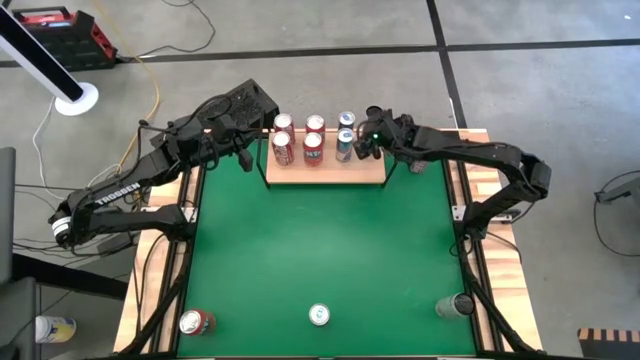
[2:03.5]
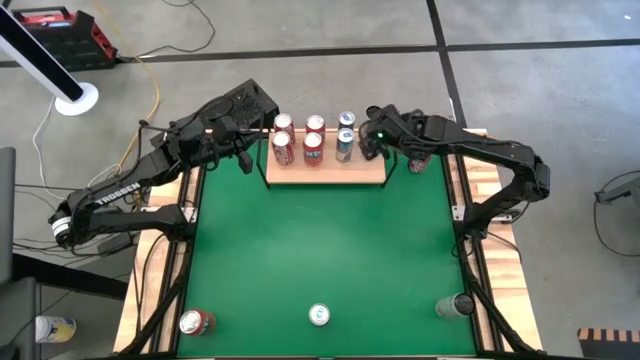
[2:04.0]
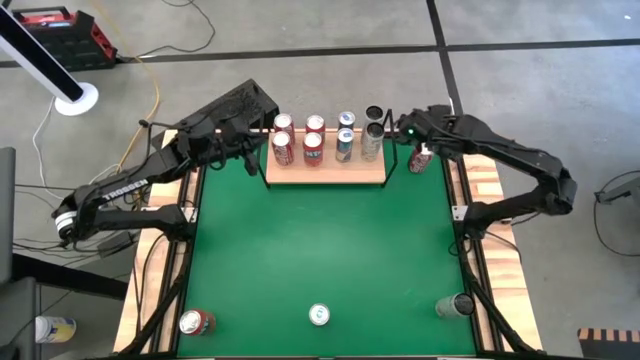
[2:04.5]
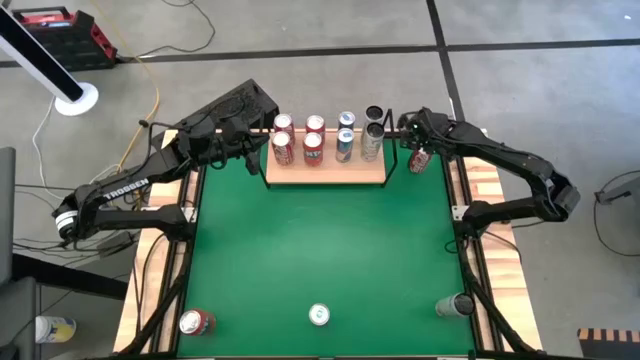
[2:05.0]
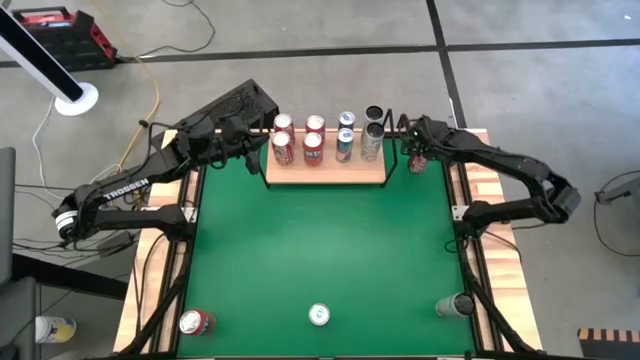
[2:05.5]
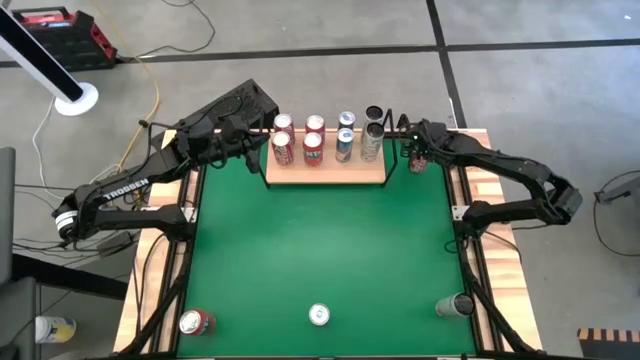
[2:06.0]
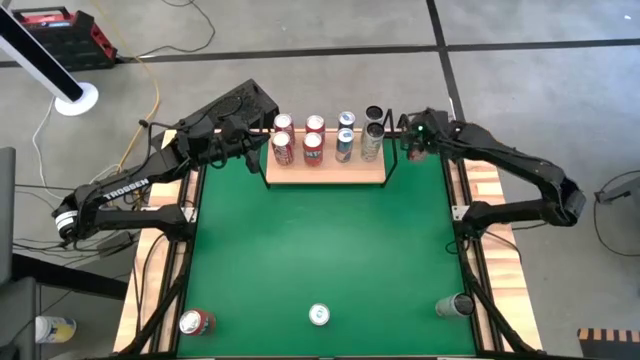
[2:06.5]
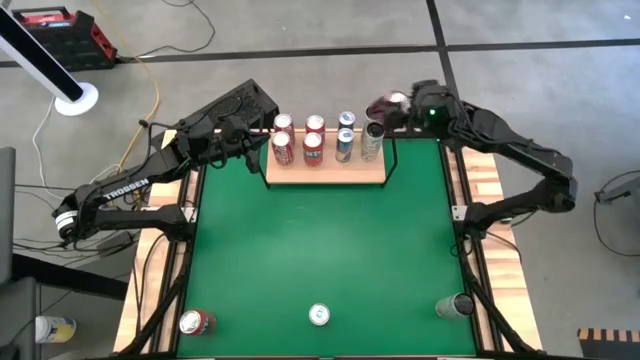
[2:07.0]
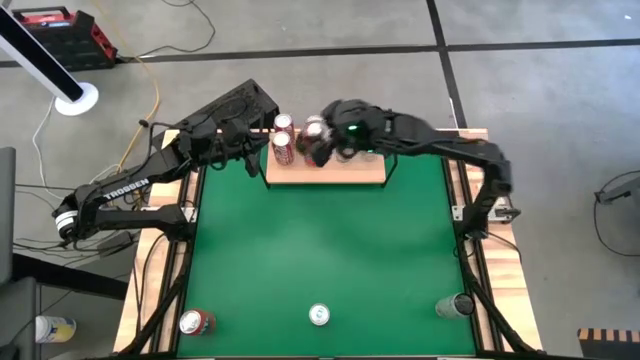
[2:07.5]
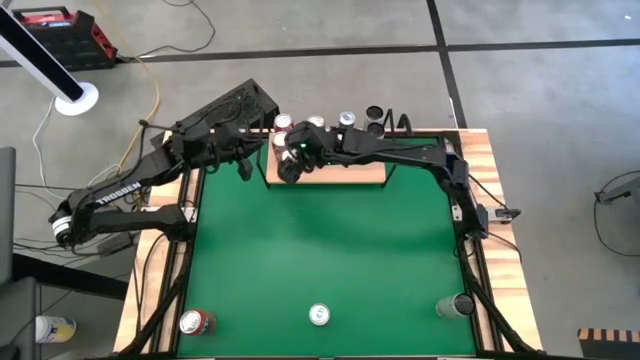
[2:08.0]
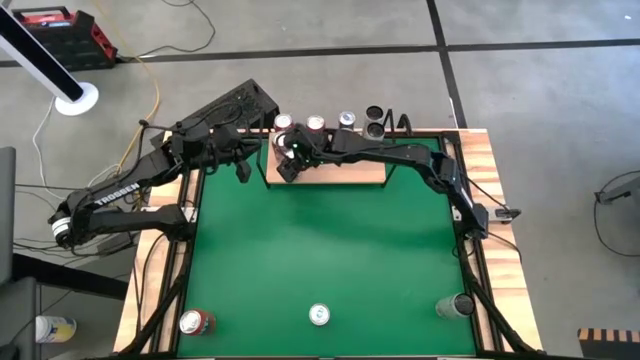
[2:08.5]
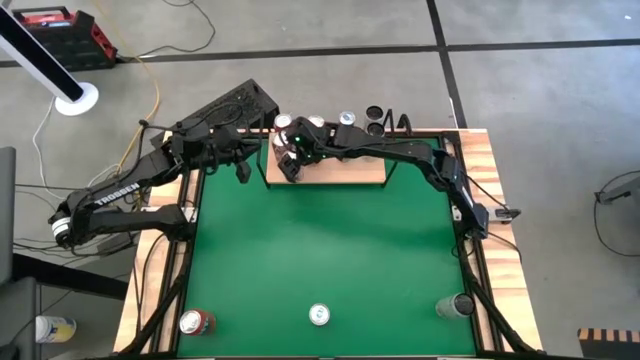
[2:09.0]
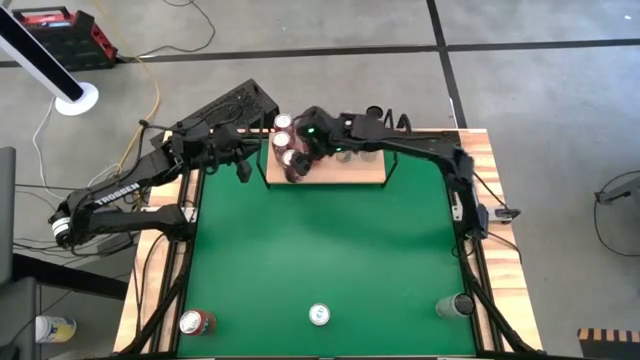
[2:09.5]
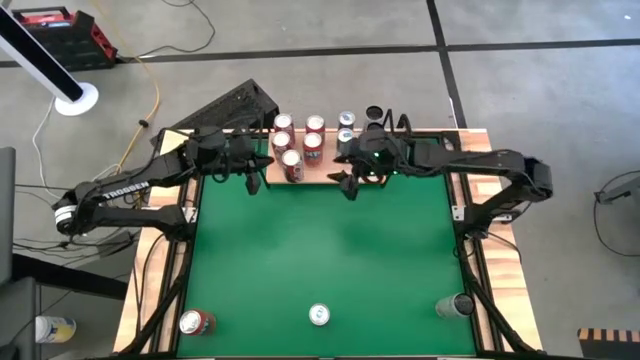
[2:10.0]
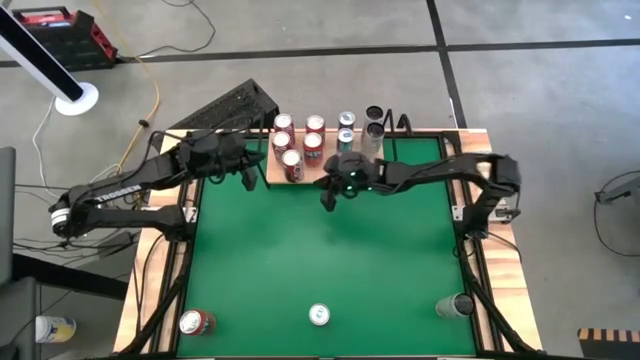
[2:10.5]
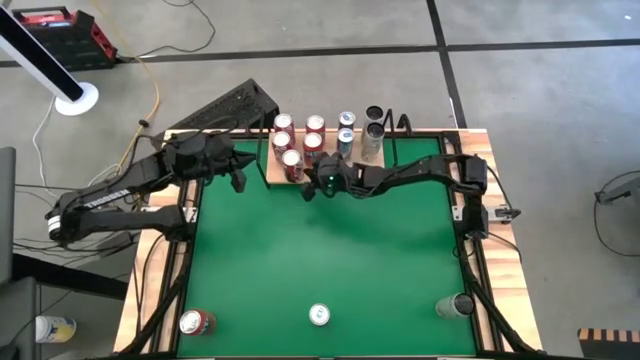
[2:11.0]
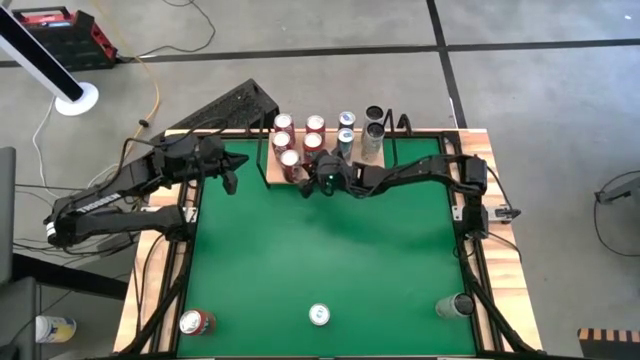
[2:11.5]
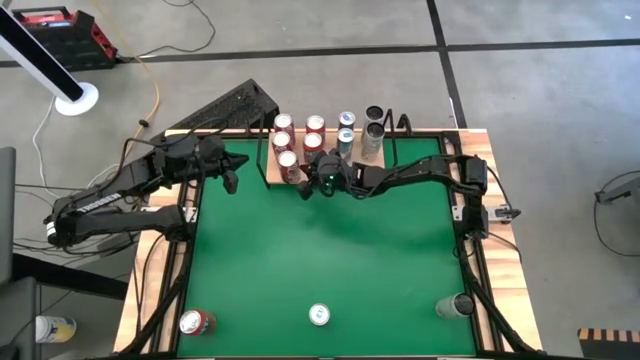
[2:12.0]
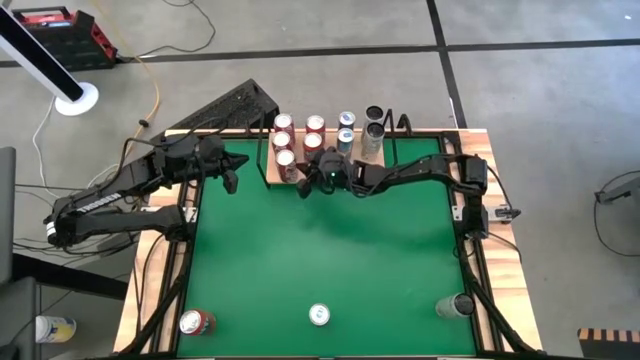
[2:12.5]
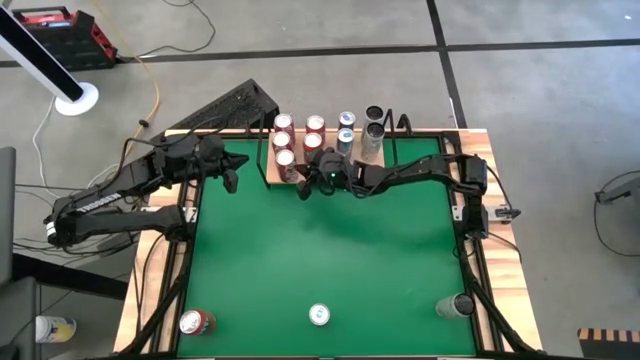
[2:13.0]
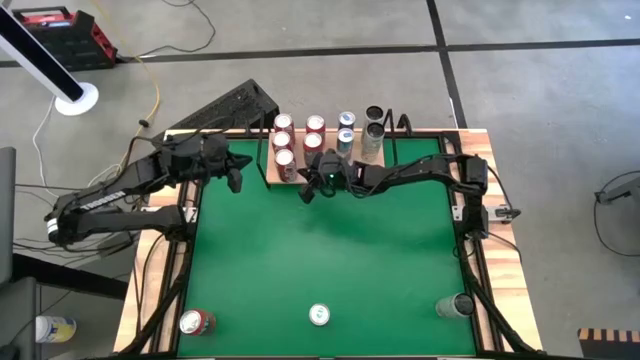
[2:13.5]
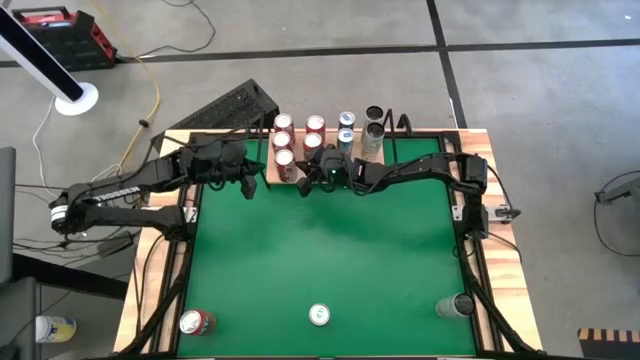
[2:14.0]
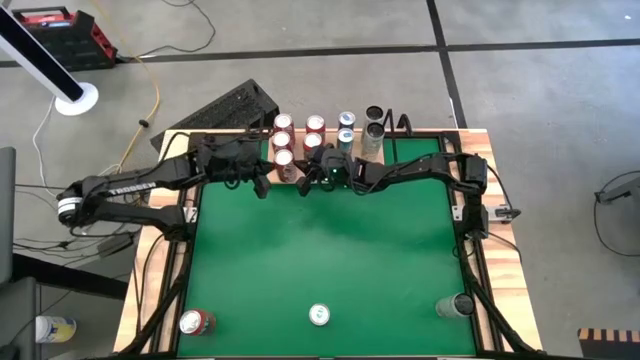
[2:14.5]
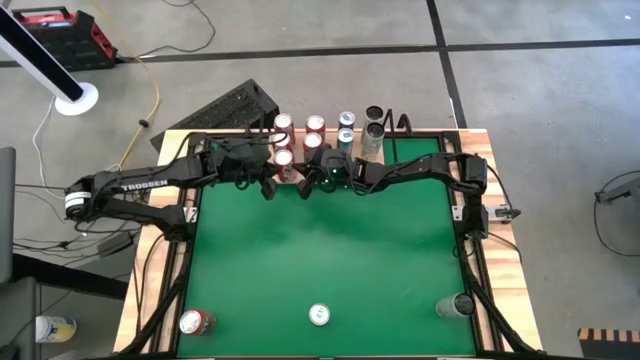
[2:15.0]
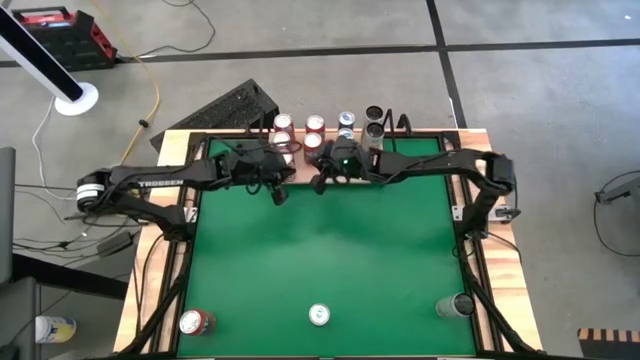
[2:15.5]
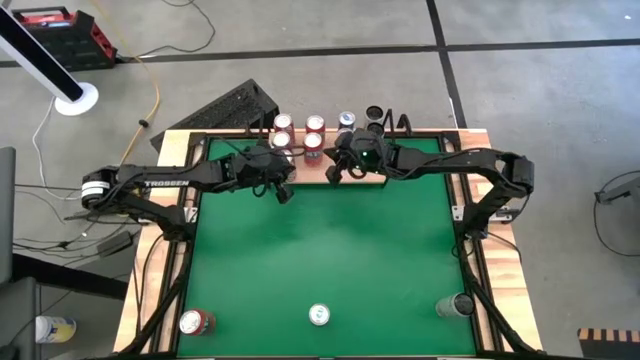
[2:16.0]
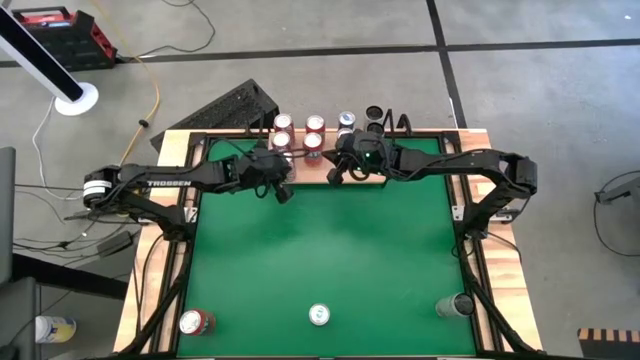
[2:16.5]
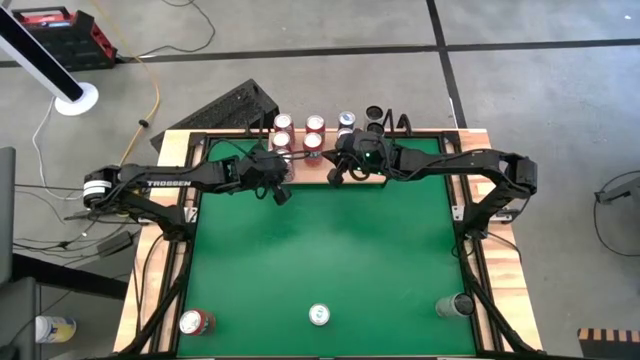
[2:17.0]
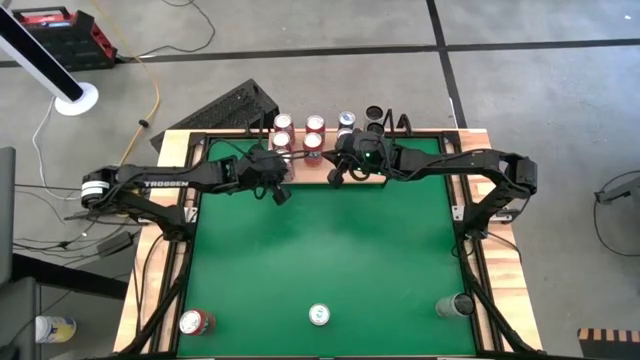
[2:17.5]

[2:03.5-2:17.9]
Task: Place canned beverage on shelf
Put the red soda can on the shelf

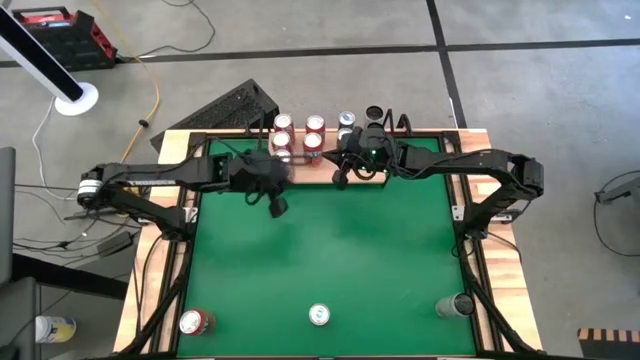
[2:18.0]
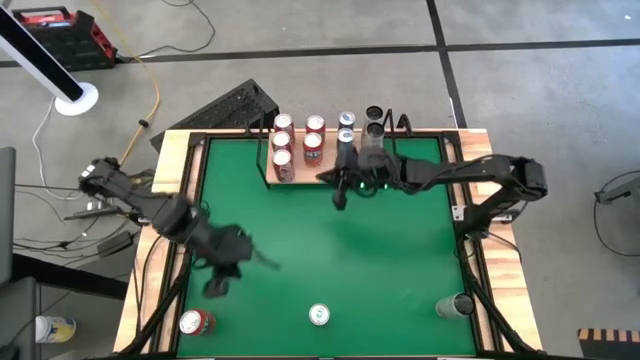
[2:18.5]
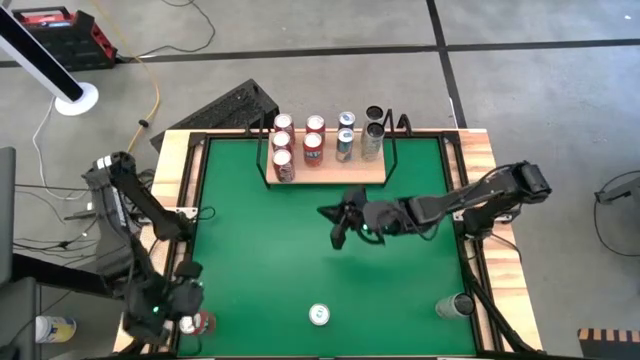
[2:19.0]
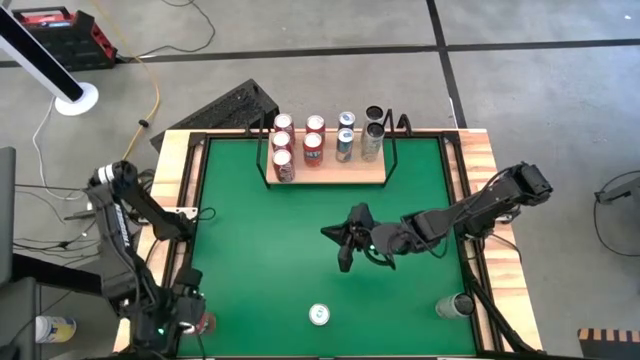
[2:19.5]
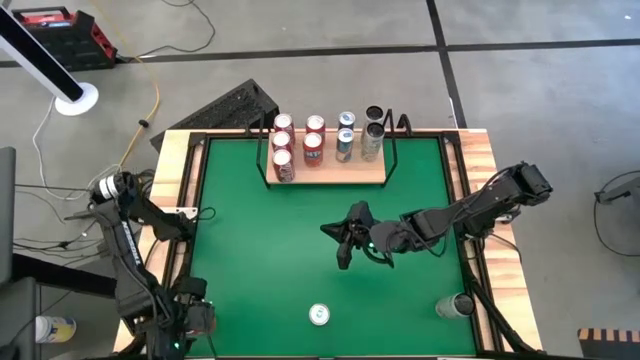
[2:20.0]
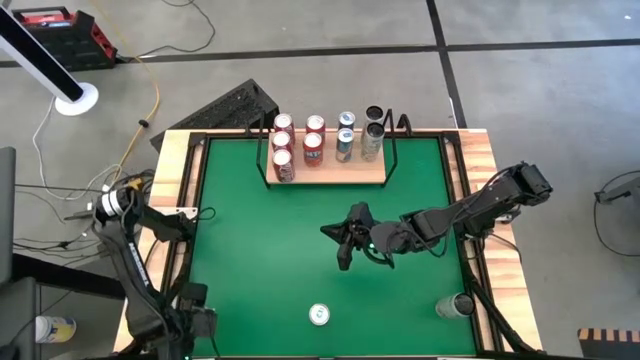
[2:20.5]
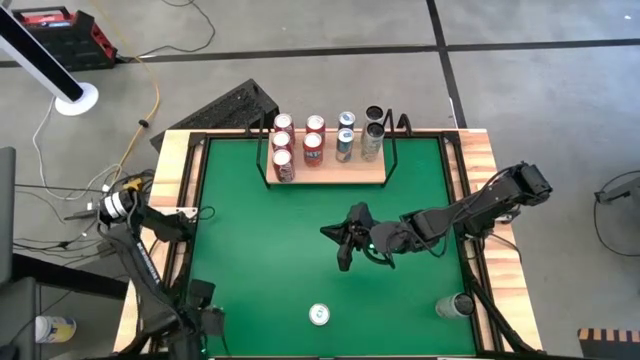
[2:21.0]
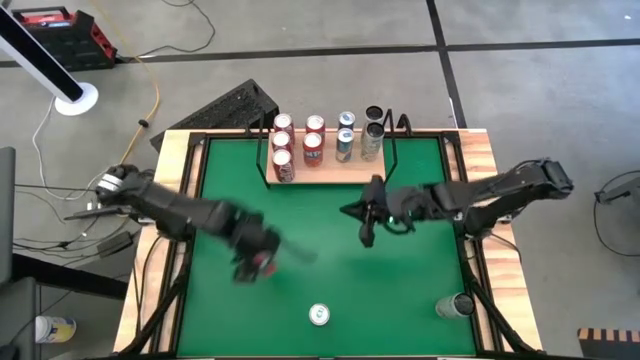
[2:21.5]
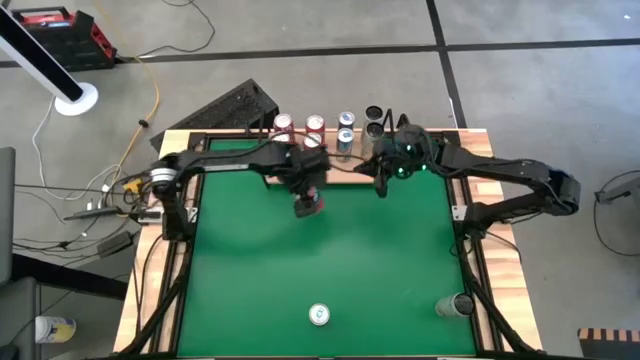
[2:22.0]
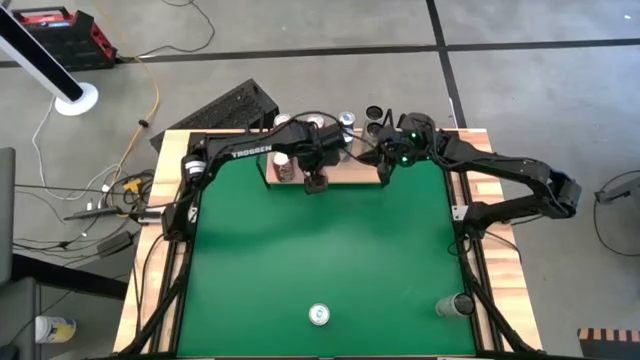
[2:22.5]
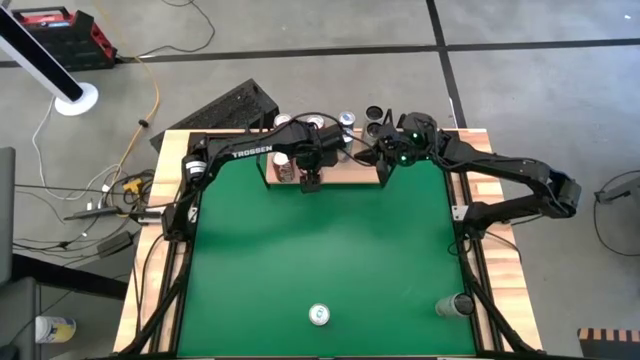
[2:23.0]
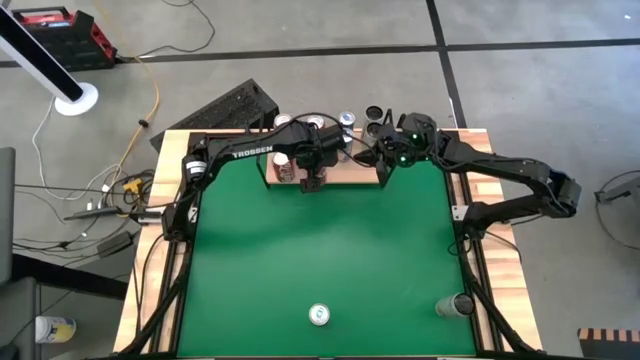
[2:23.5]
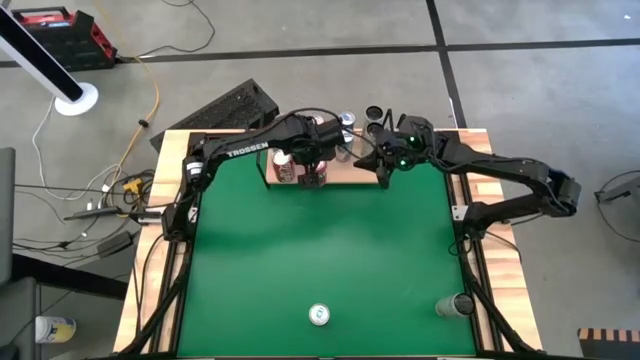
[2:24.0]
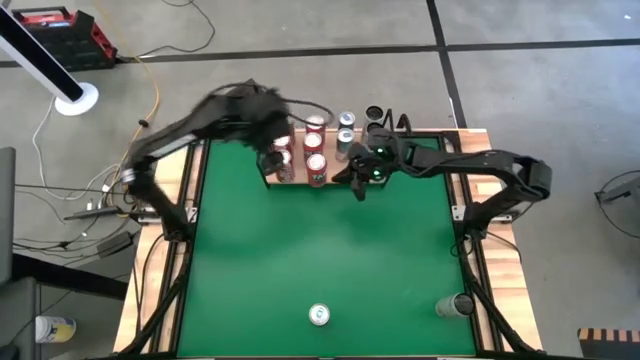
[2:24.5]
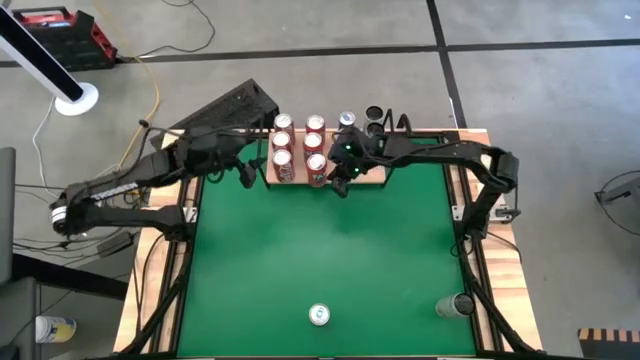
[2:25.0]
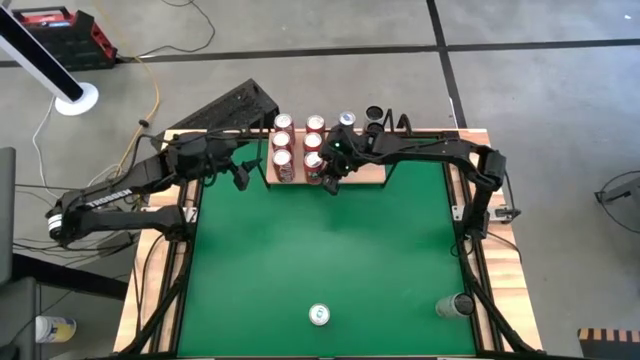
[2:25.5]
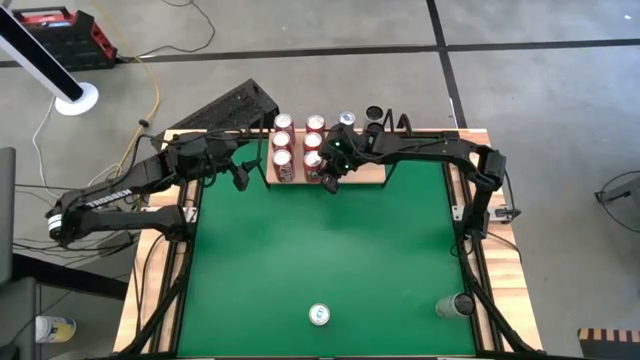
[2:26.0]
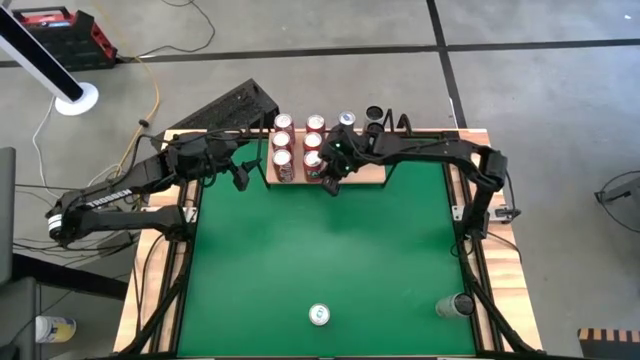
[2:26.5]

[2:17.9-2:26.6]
Put the orange soda can on the shelf
